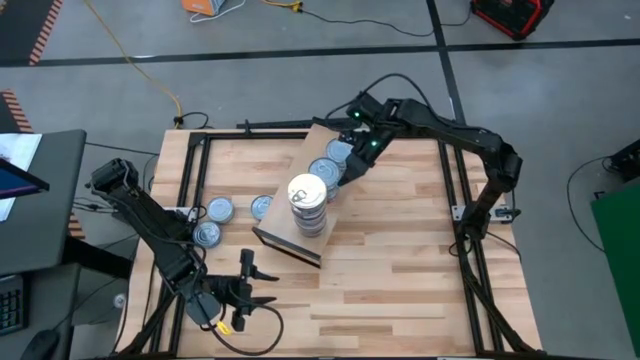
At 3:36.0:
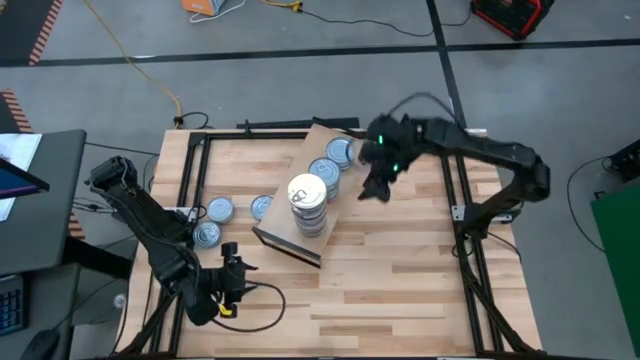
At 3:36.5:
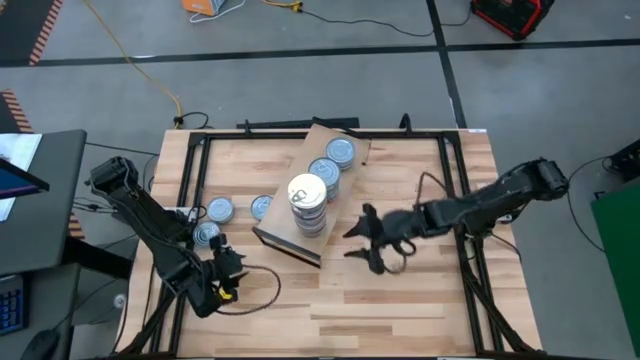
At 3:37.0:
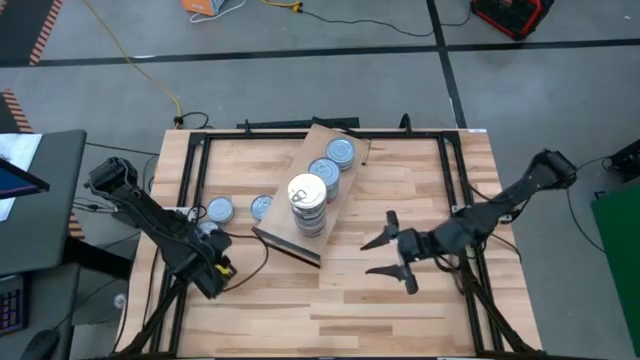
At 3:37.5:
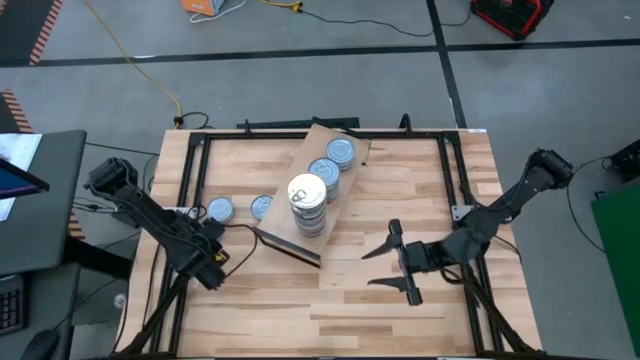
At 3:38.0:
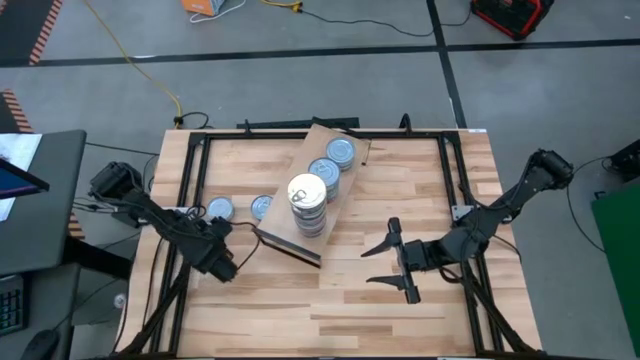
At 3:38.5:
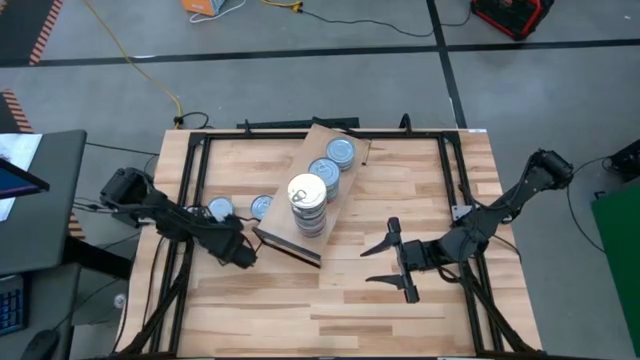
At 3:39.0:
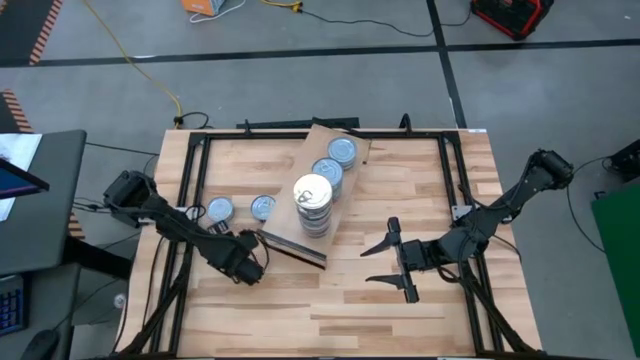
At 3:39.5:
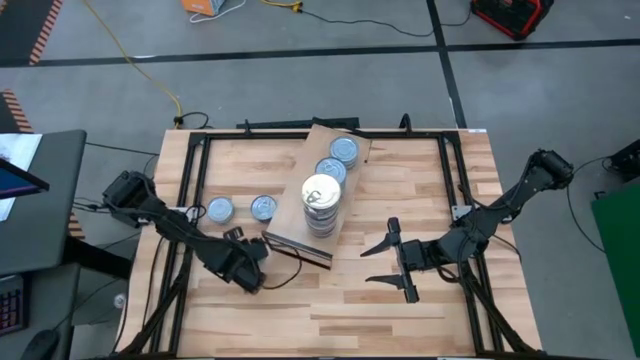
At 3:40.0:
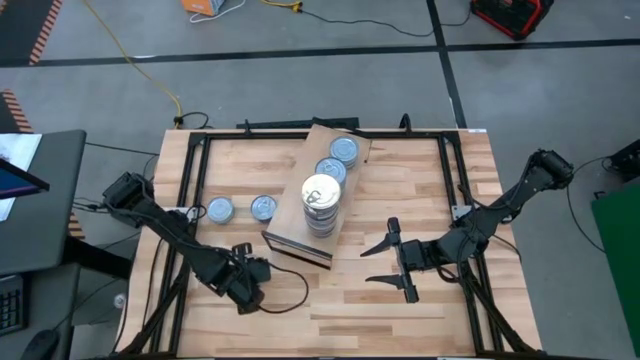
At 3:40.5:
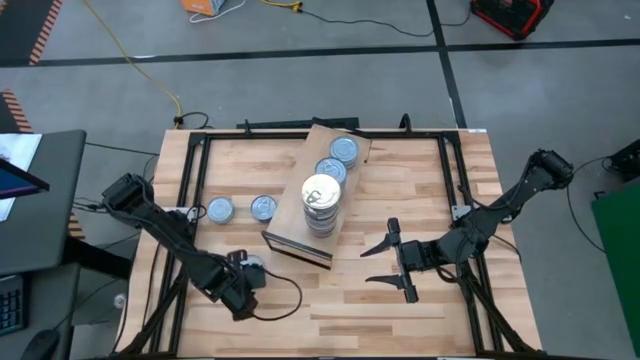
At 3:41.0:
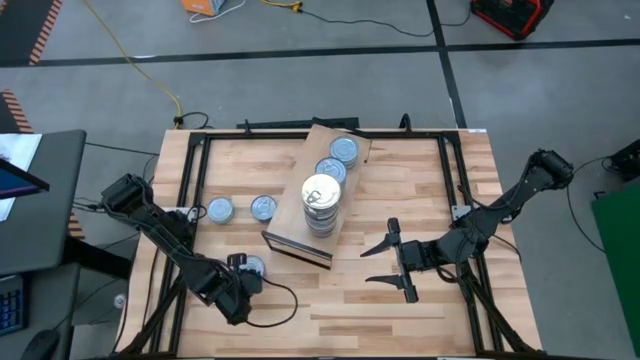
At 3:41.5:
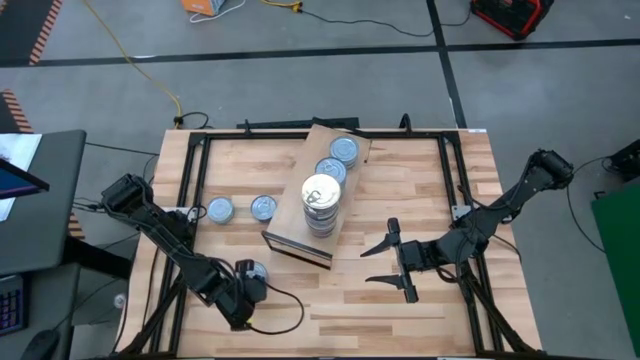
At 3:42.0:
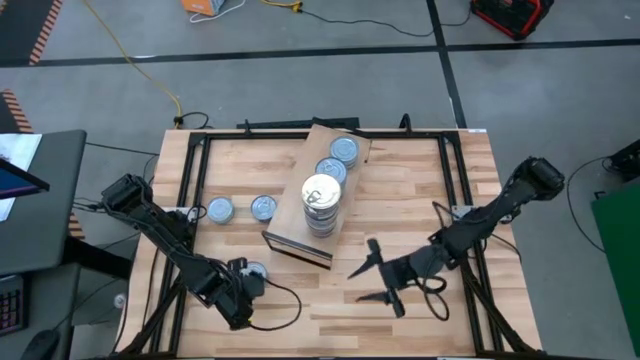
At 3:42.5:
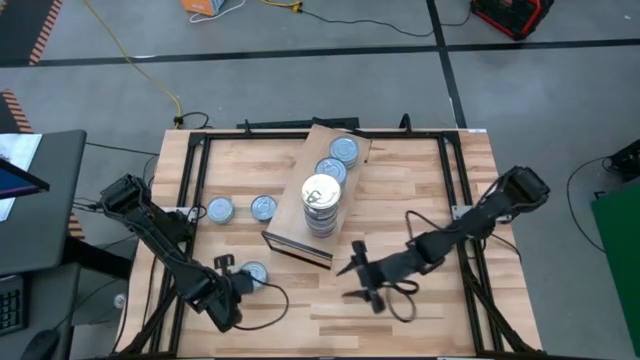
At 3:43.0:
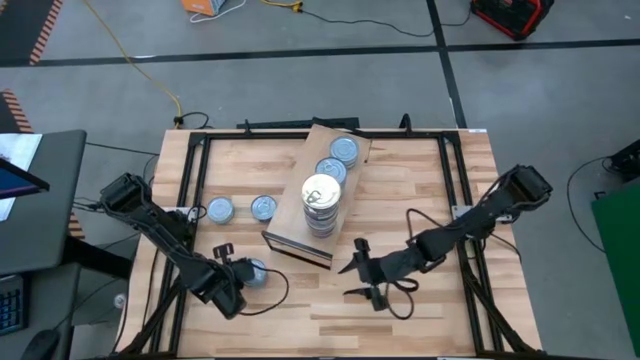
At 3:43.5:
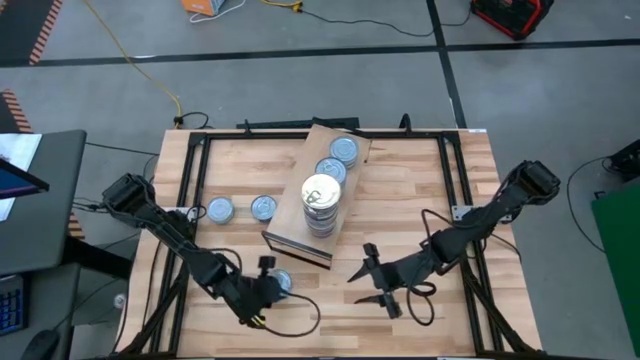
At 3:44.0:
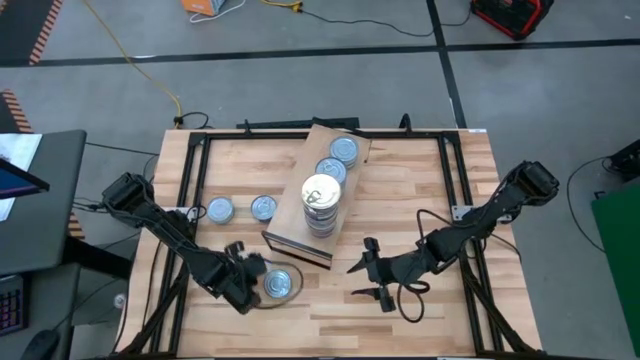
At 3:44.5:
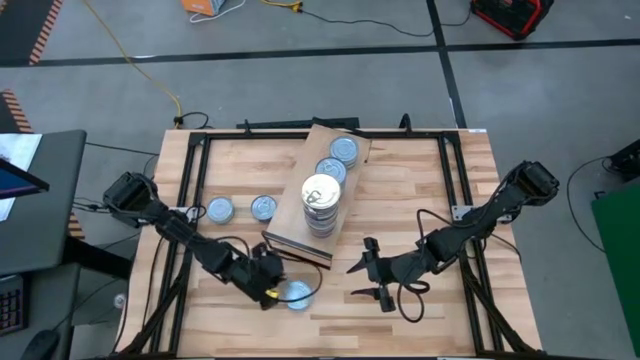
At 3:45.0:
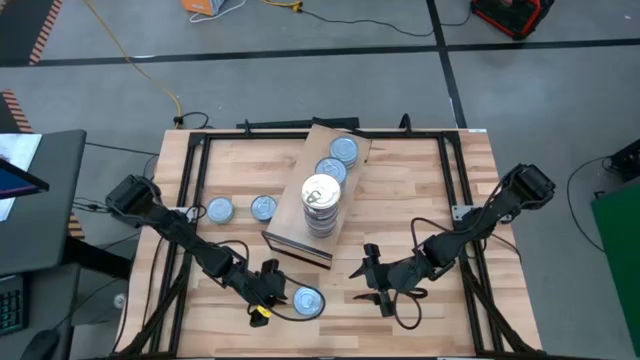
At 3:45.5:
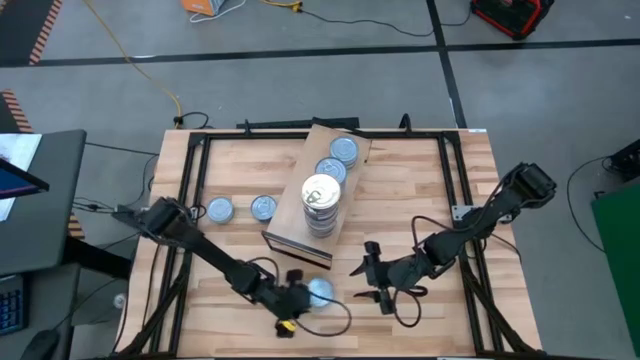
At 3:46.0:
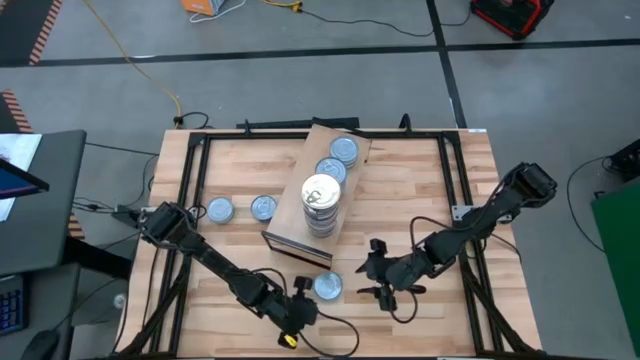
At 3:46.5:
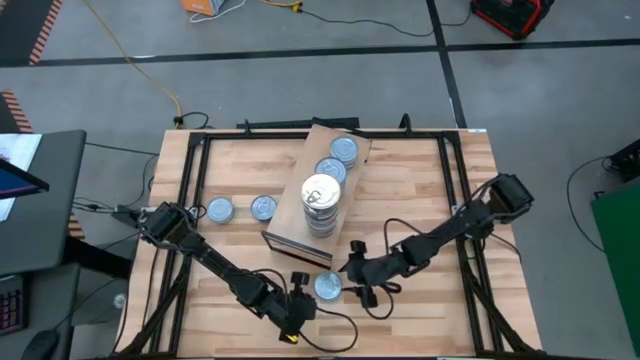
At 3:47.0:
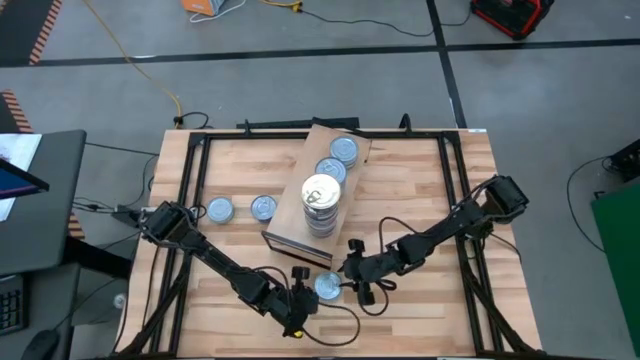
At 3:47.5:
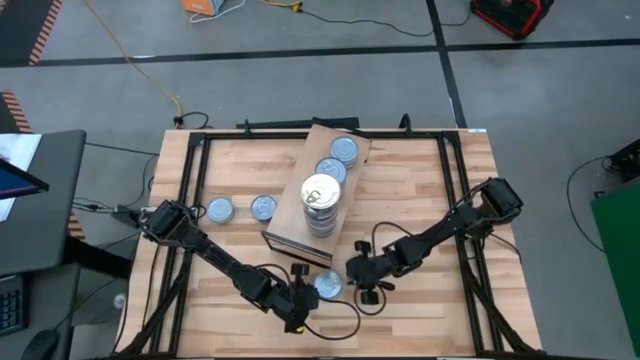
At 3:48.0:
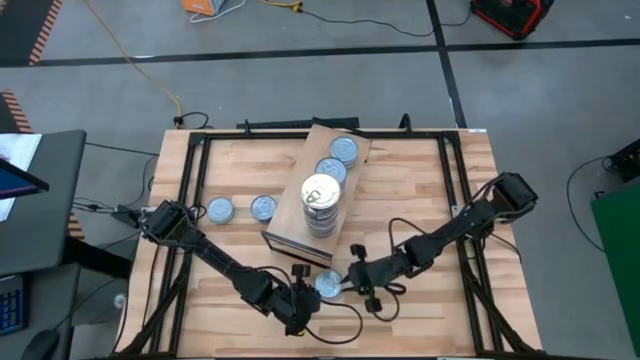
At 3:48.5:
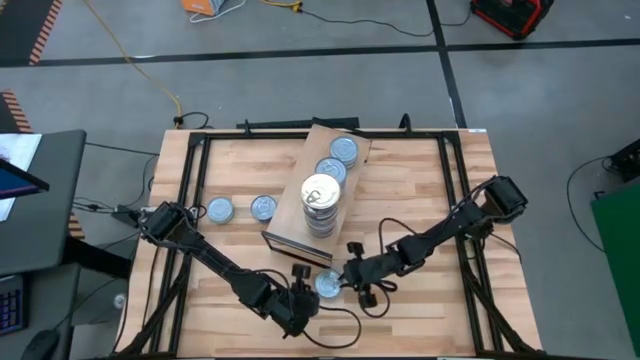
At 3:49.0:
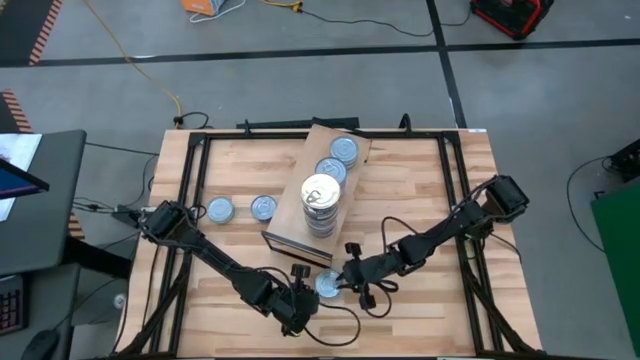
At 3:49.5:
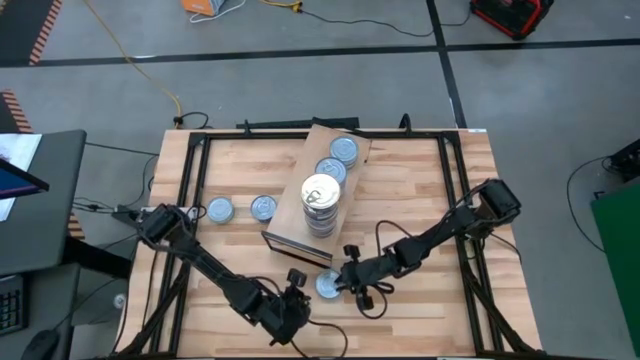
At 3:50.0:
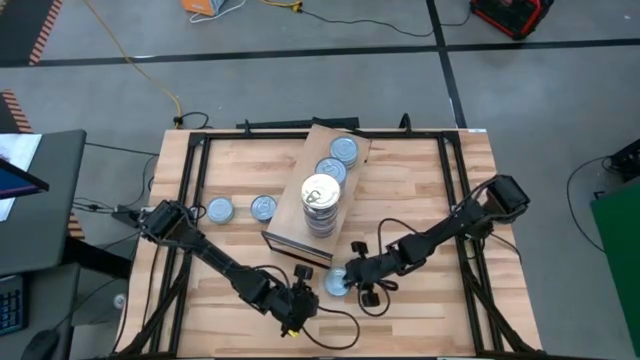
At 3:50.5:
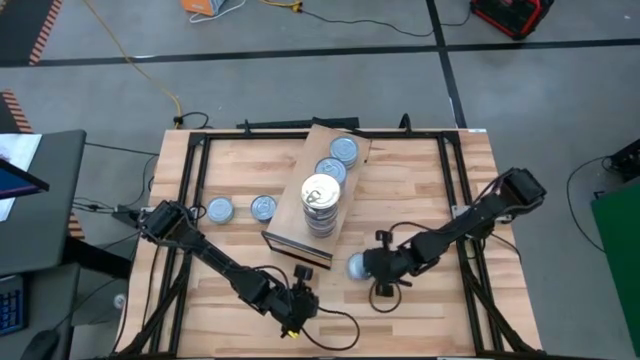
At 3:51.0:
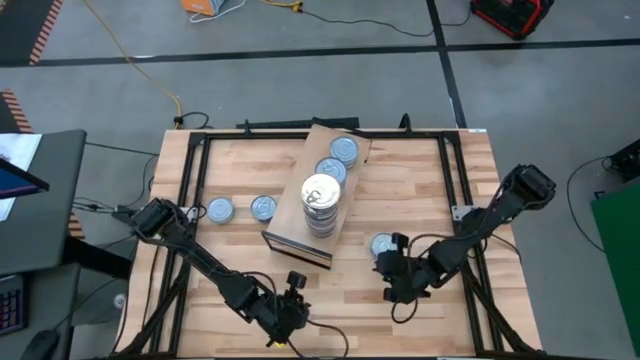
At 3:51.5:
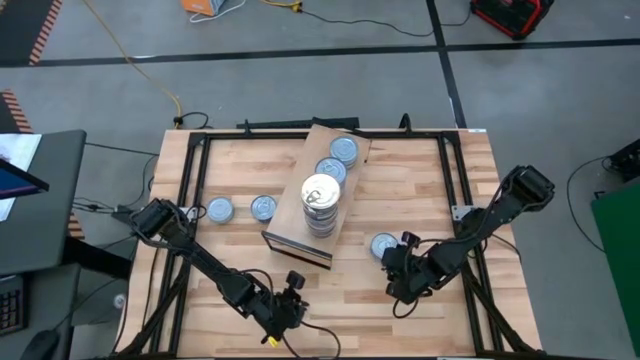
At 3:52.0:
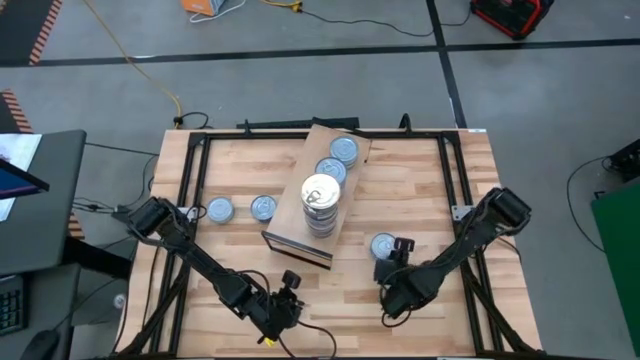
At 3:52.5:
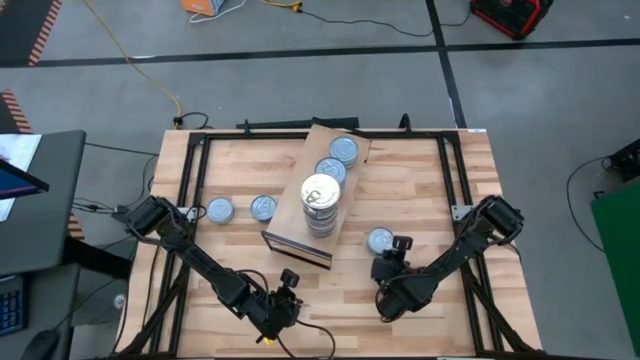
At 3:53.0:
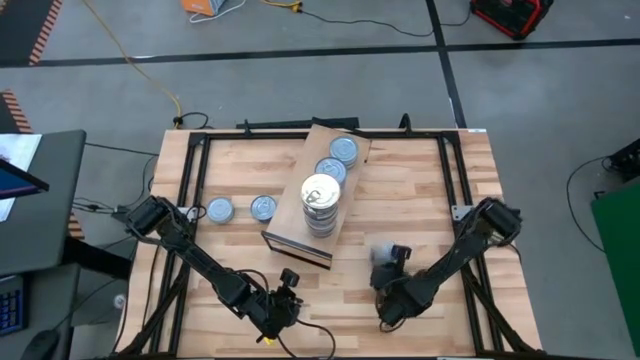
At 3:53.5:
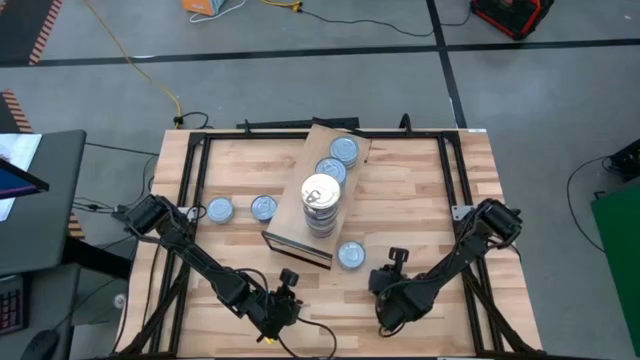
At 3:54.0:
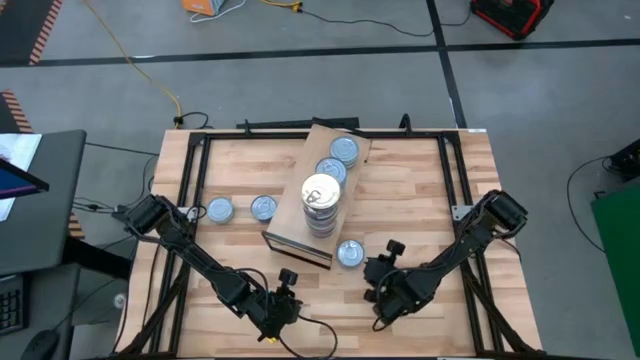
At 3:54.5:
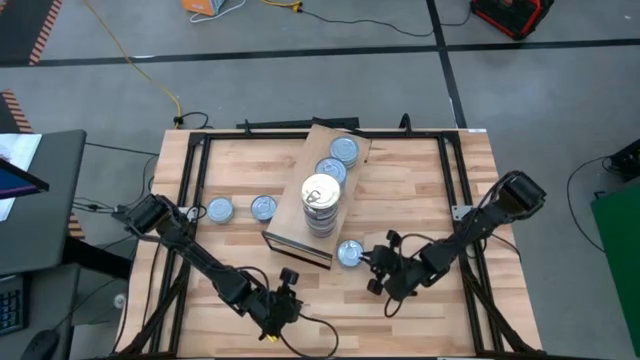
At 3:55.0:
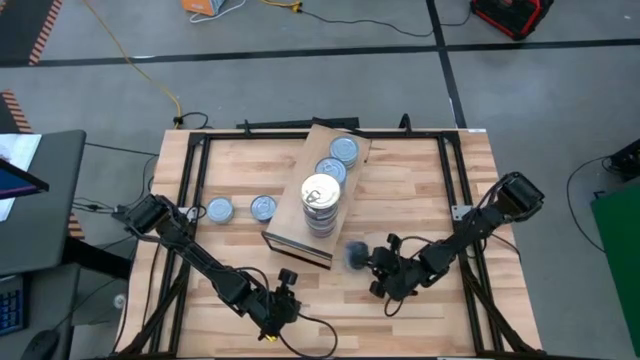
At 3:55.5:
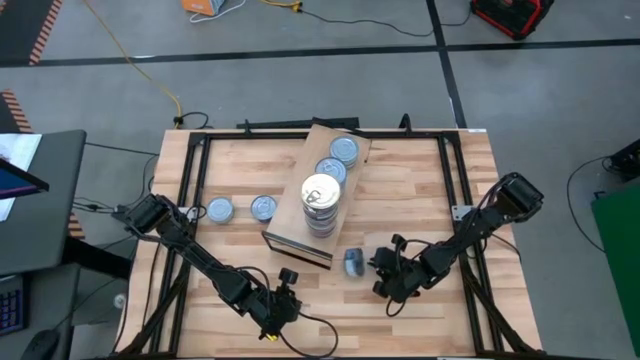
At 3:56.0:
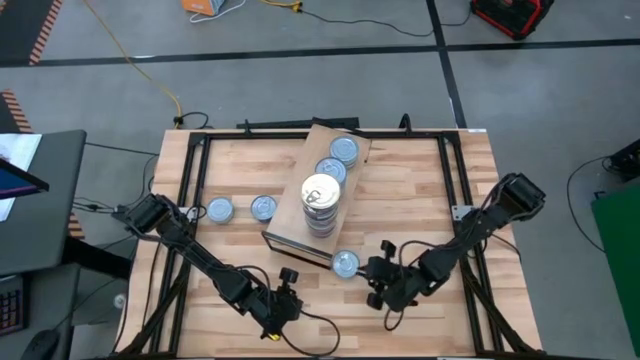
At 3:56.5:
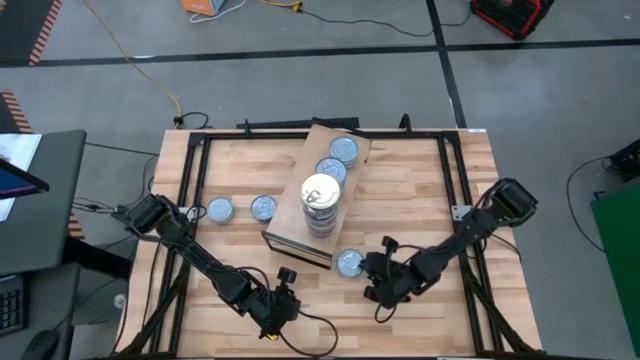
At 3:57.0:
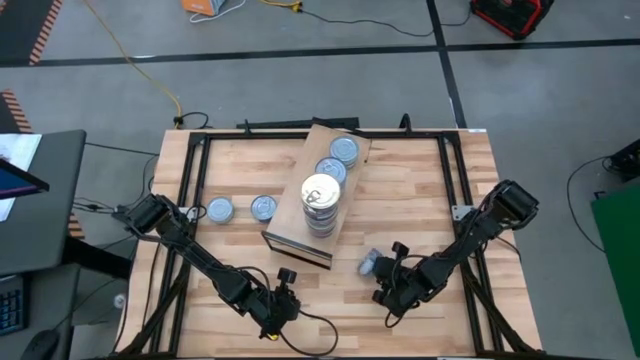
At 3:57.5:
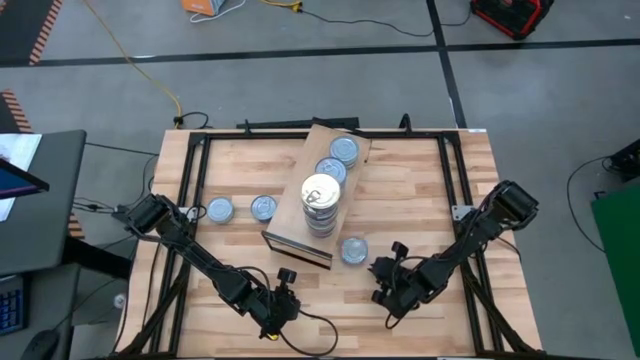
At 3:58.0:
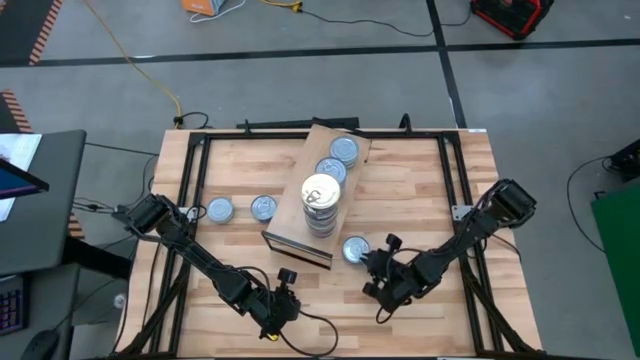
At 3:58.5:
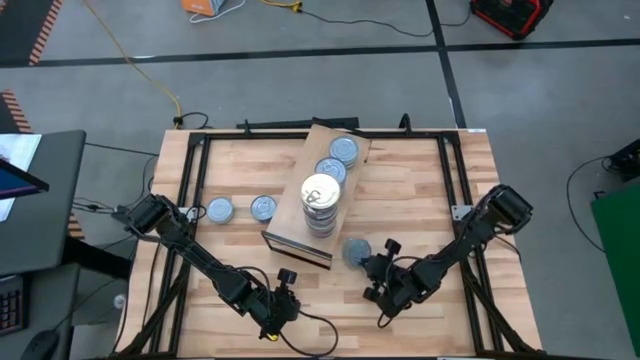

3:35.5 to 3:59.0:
Task: Stack canned seafood by type on shelf
Stack the blue tuna can on top of the blue tuna can on the shelf
